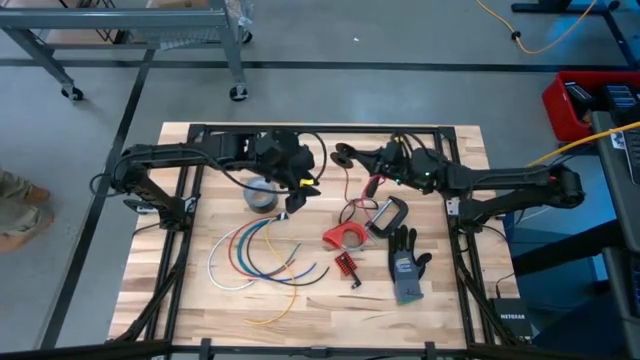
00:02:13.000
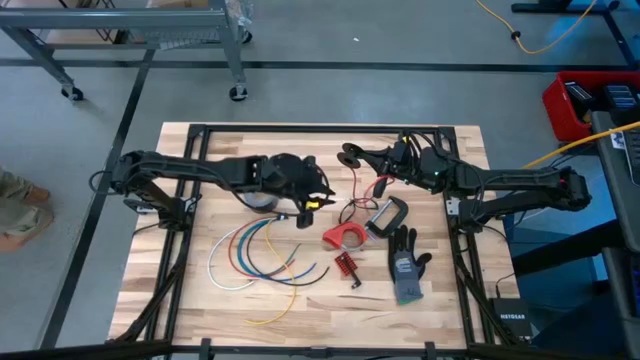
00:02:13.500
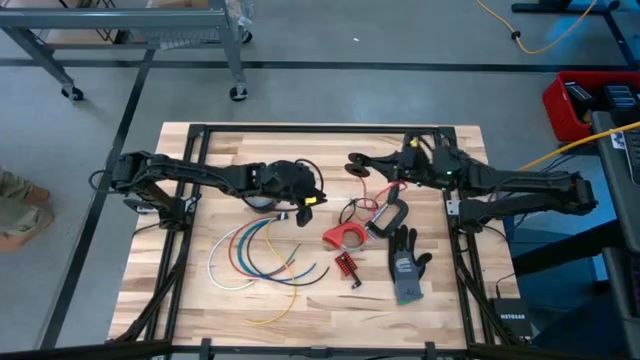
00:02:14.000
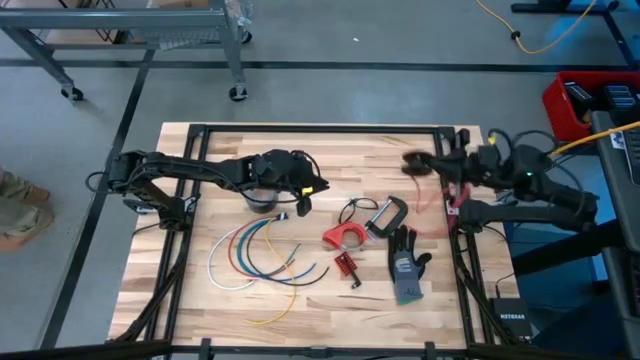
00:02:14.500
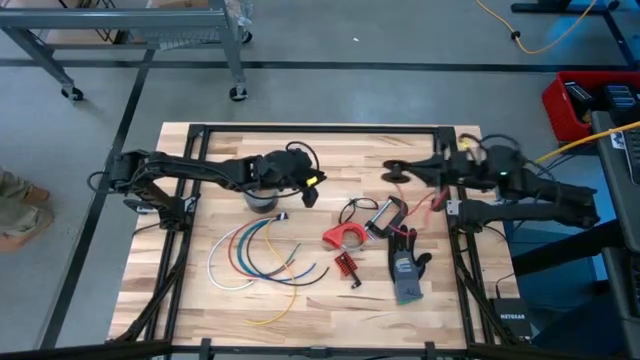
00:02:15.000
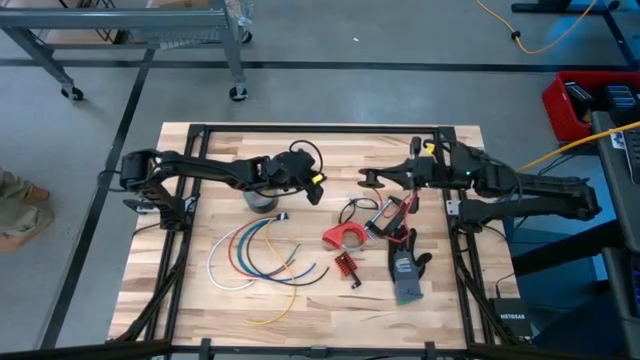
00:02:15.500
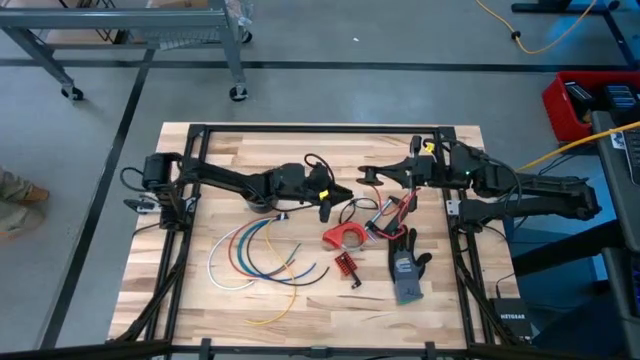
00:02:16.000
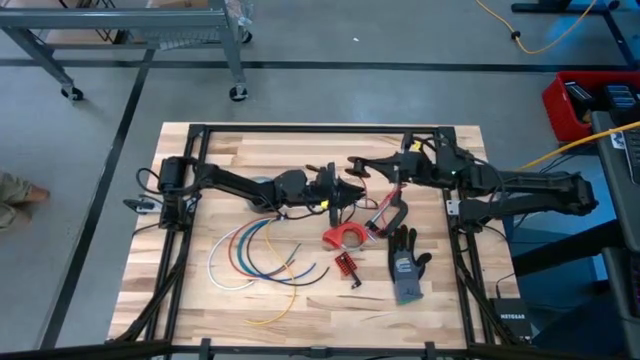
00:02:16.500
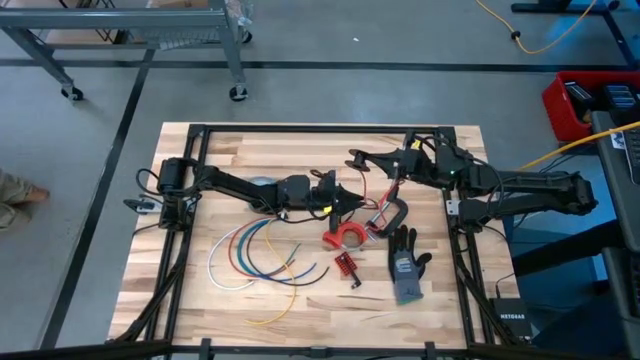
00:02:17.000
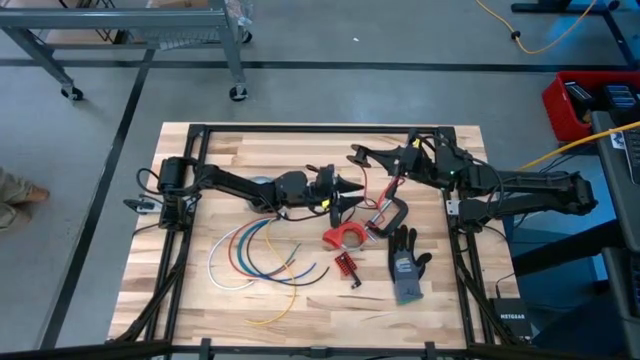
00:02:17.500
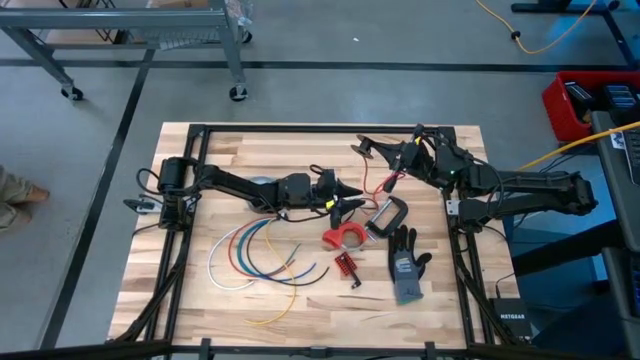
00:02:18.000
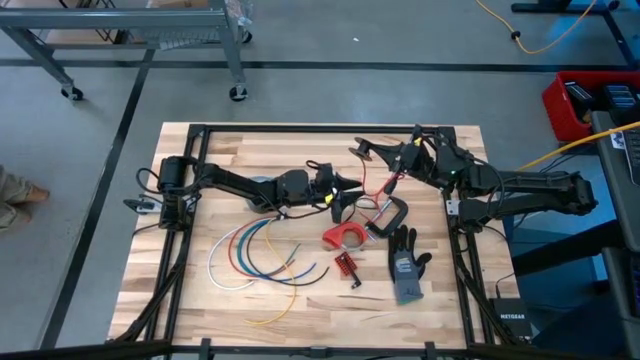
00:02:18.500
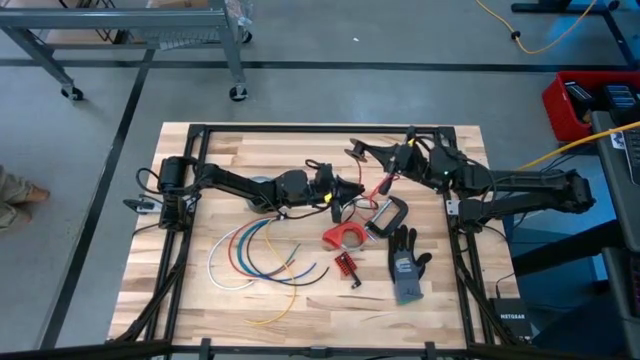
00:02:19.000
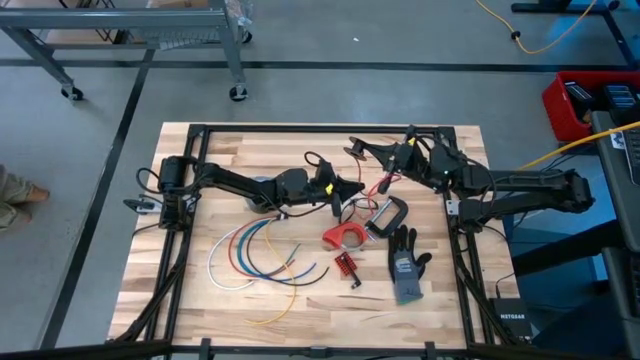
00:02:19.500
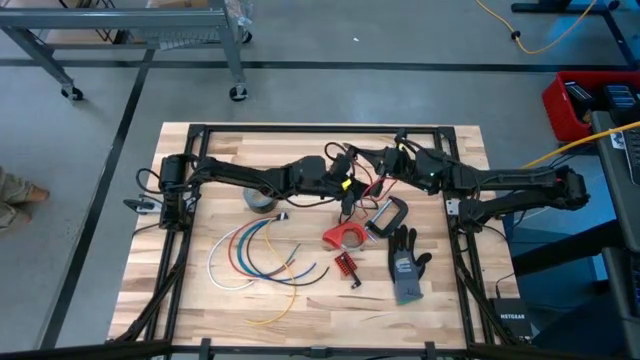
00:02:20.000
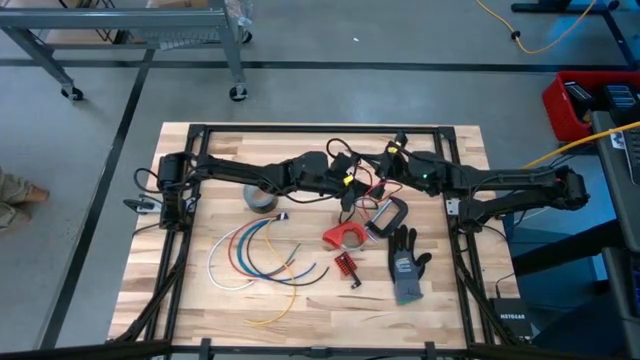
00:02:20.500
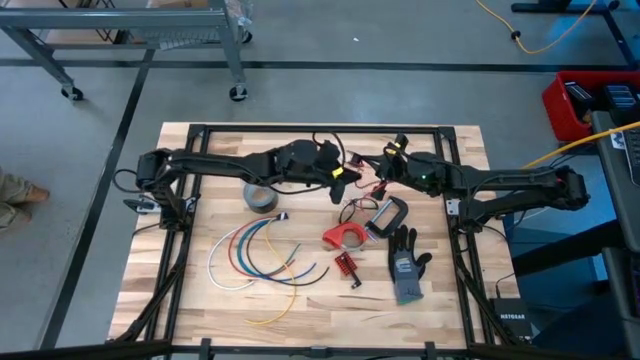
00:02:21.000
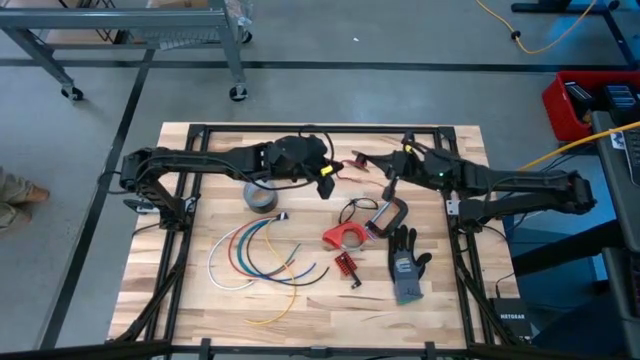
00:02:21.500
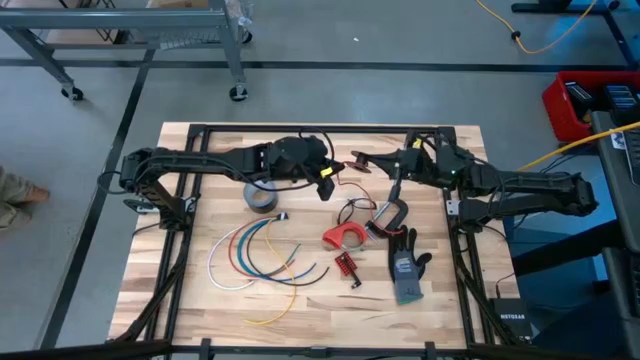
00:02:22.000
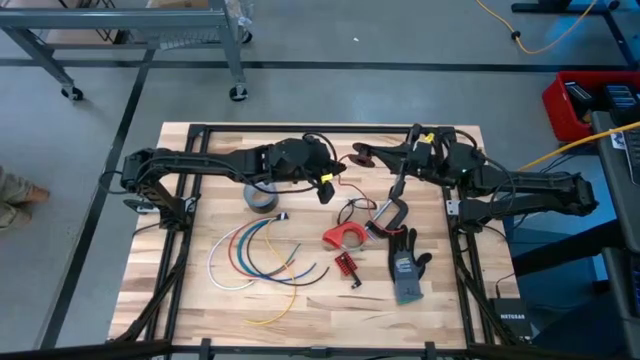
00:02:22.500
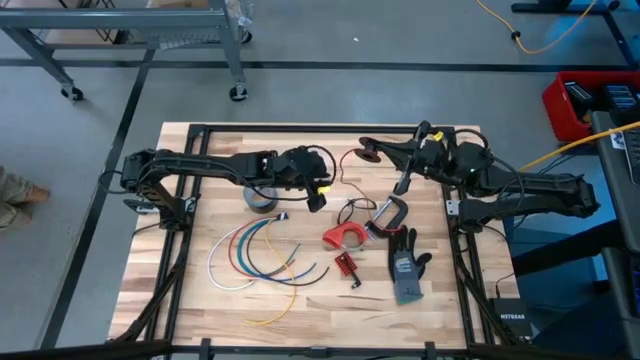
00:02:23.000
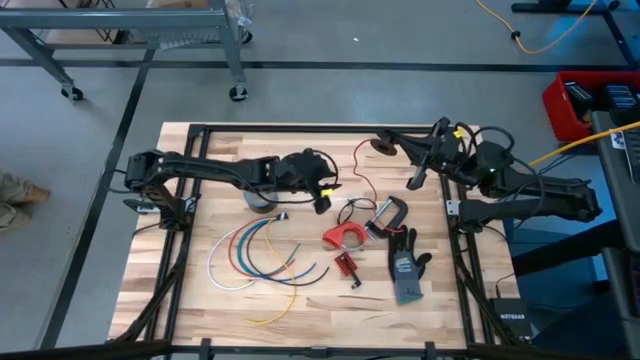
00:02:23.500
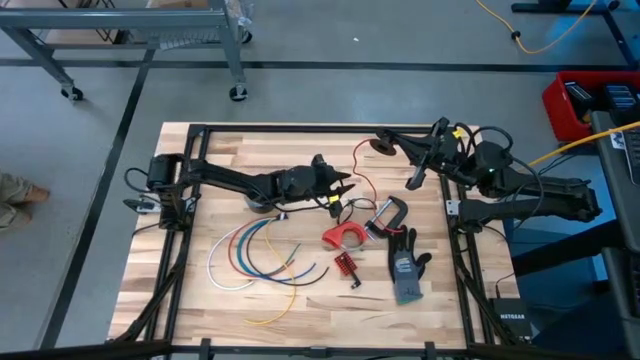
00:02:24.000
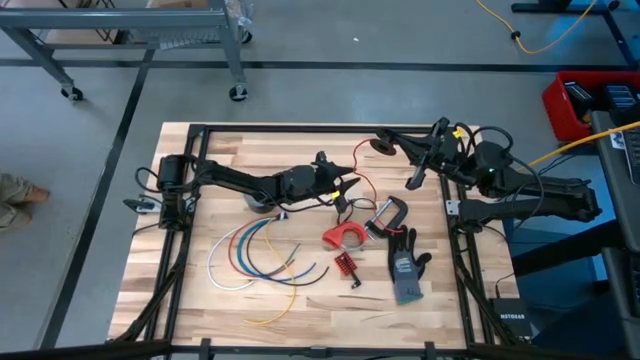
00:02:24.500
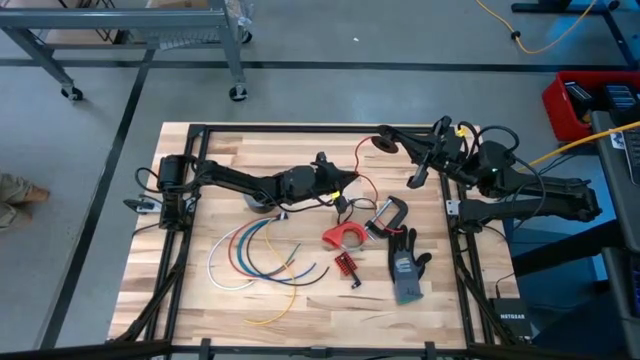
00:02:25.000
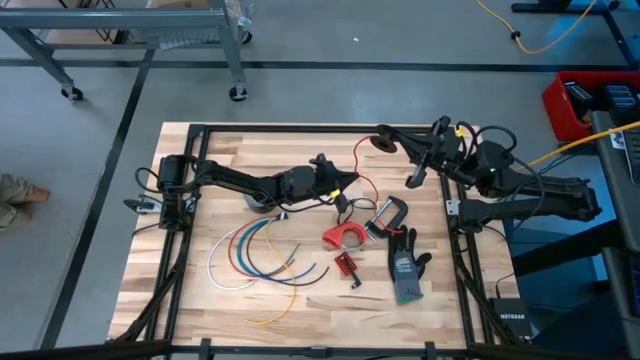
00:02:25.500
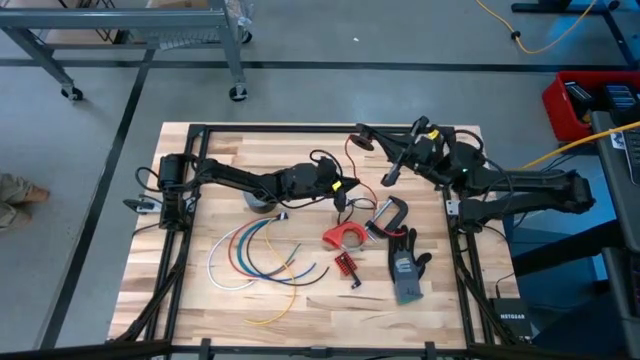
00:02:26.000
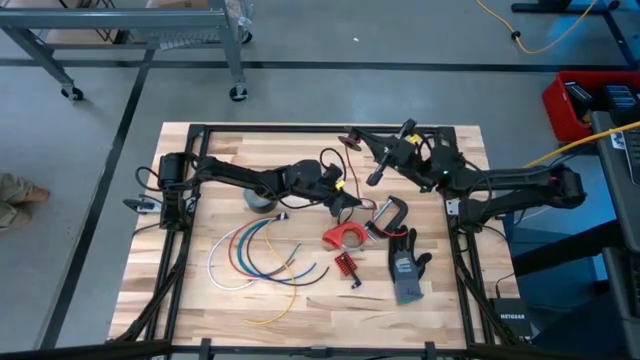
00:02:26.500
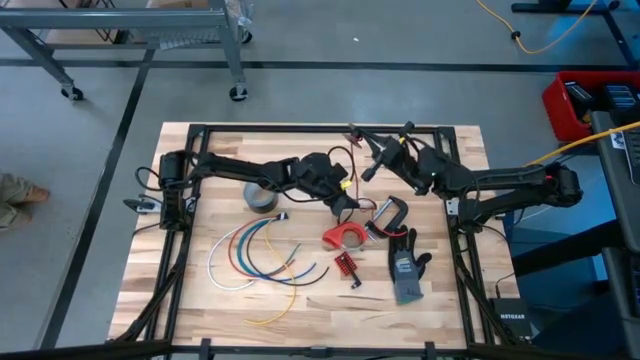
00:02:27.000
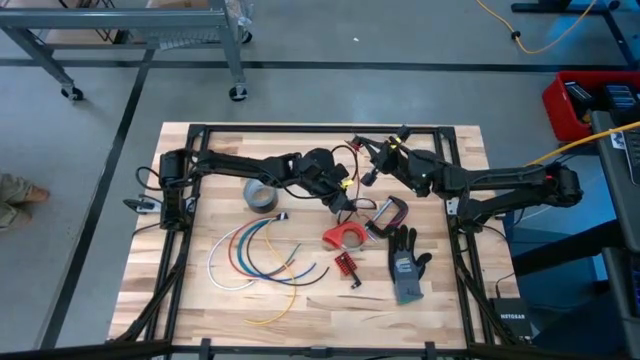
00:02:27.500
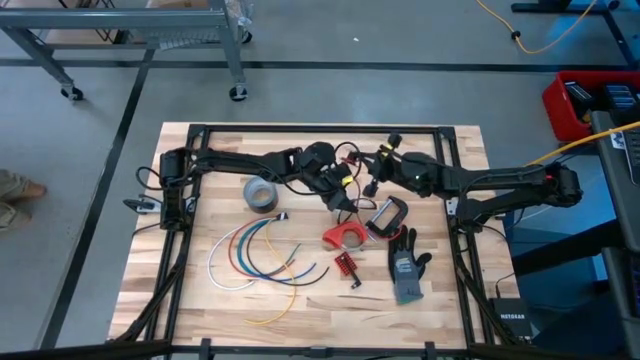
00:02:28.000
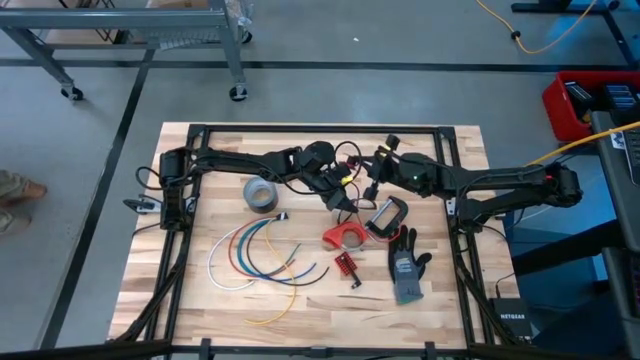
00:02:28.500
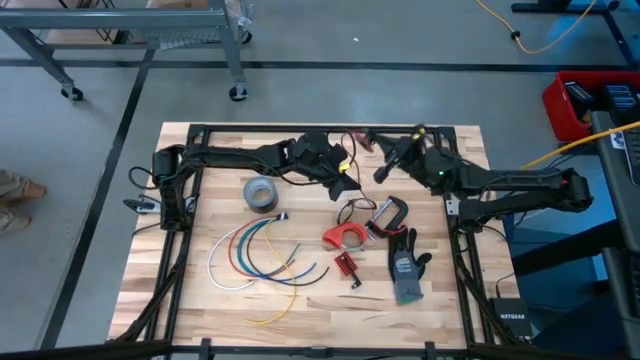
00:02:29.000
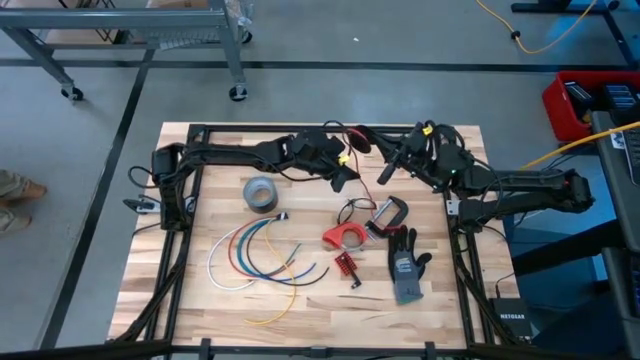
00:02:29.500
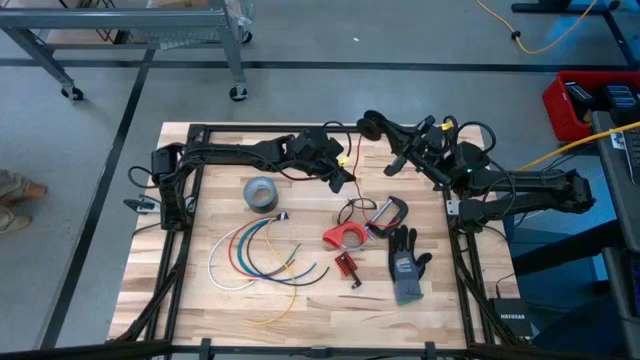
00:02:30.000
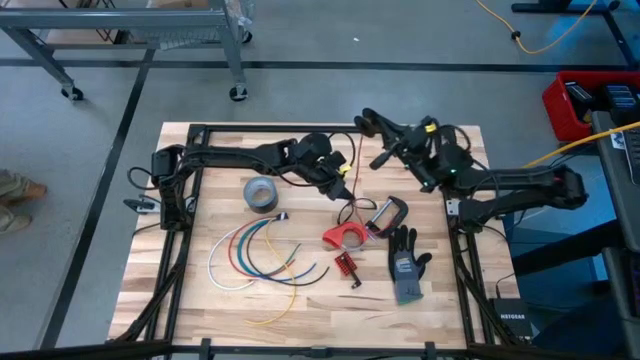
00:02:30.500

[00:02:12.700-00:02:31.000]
Task: Coil cords
Coil the red wire onto the spool

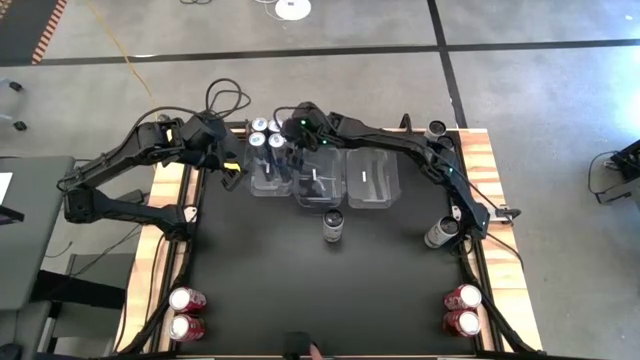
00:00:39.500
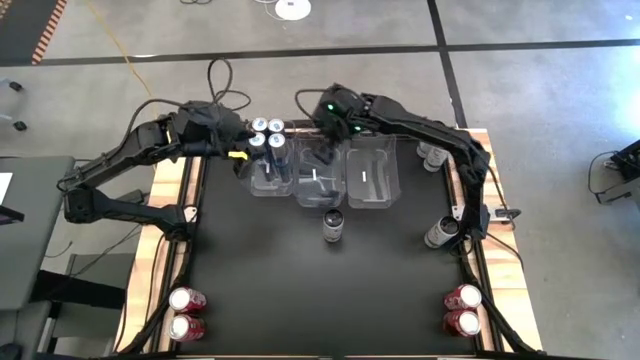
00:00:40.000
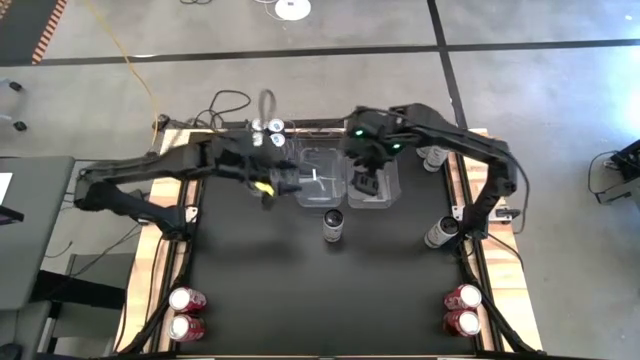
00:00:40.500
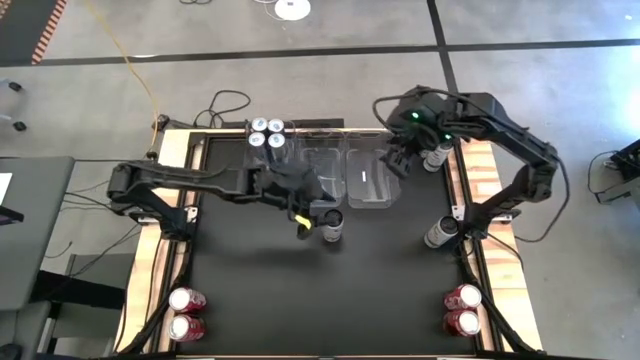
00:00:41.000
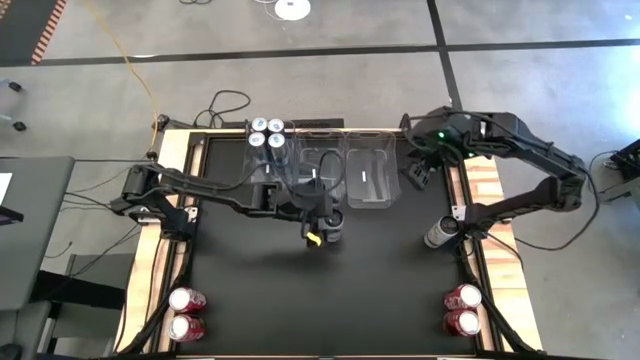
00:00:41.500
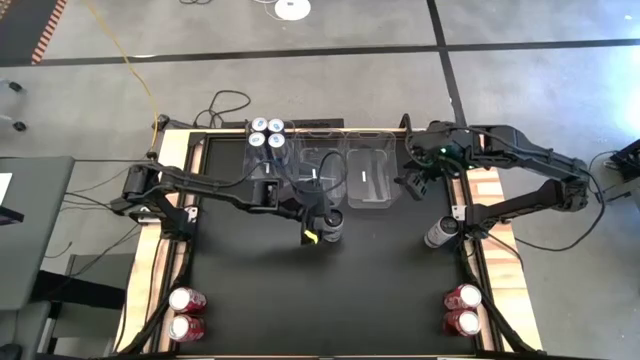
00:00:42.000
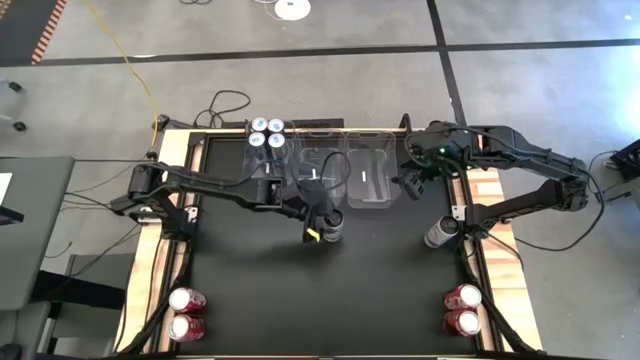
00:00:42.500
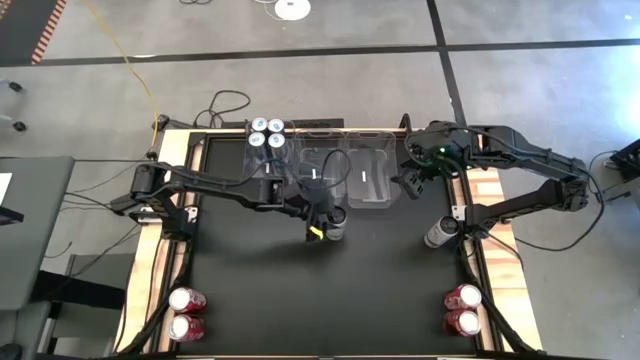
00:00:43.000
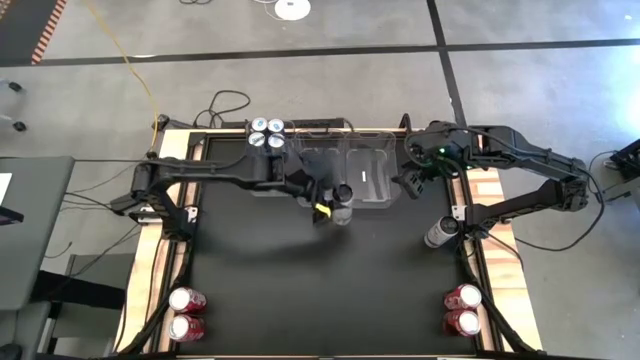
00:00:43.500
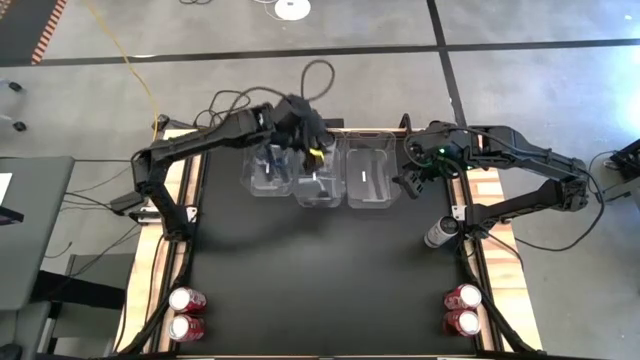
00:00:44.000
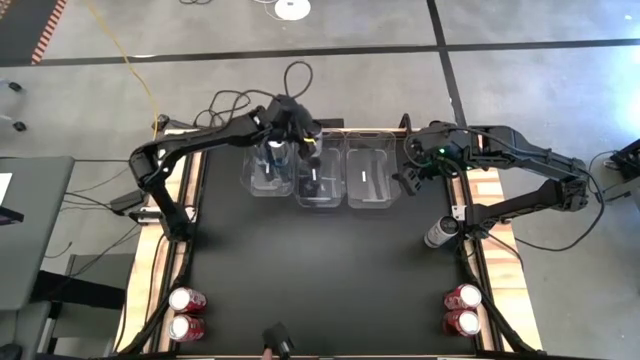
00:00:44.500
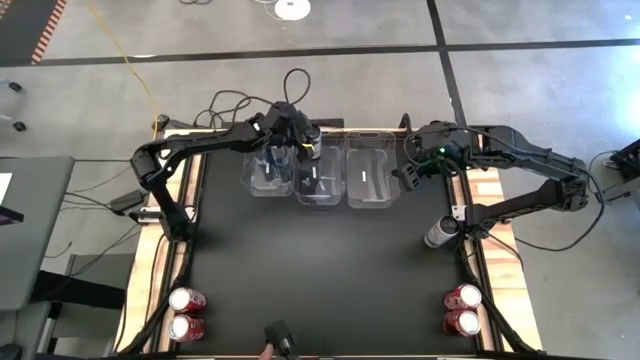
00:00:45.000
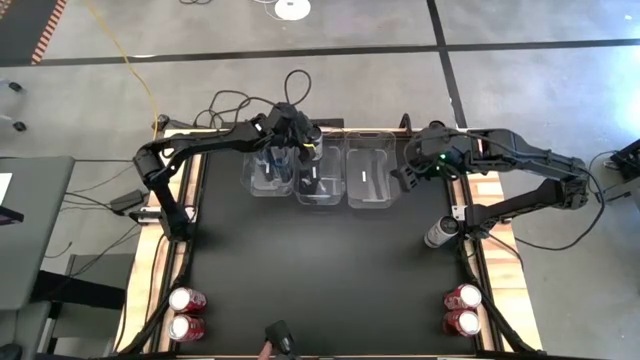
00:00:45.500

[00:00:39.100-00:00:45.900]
Task: Sort soda cans
Put the bottom left white-yellow soda can into the center transparent bin
